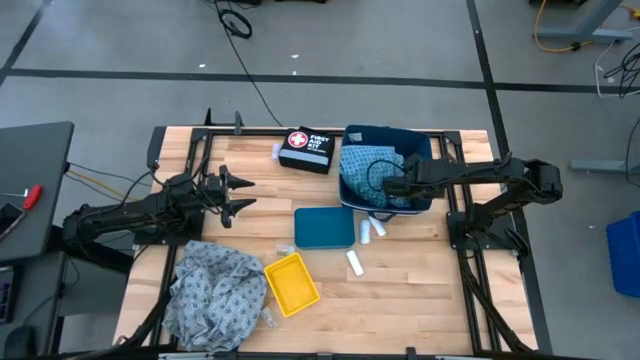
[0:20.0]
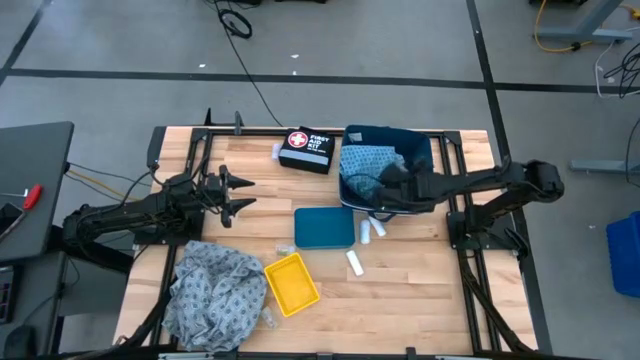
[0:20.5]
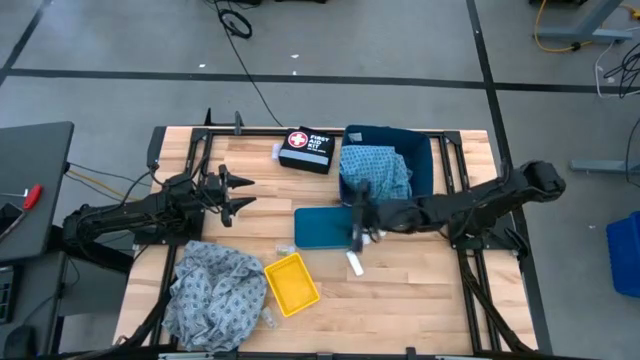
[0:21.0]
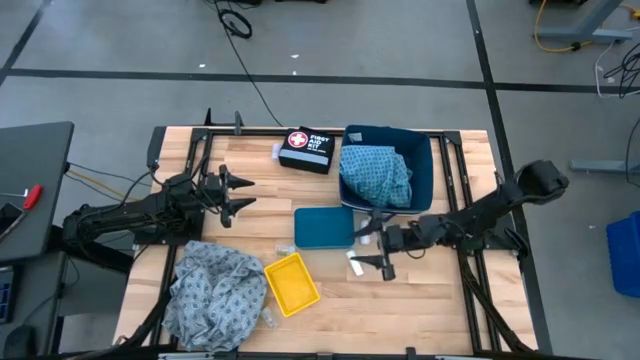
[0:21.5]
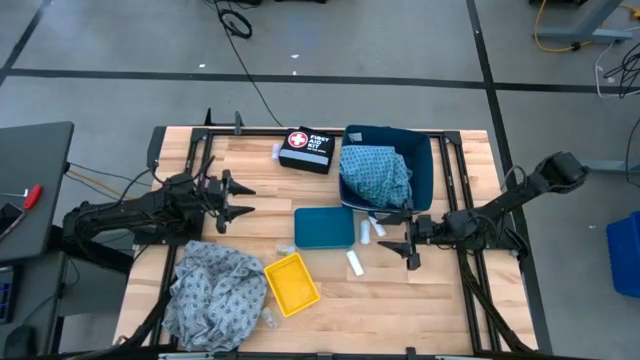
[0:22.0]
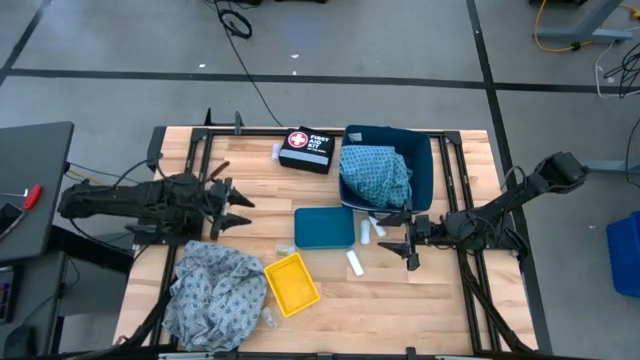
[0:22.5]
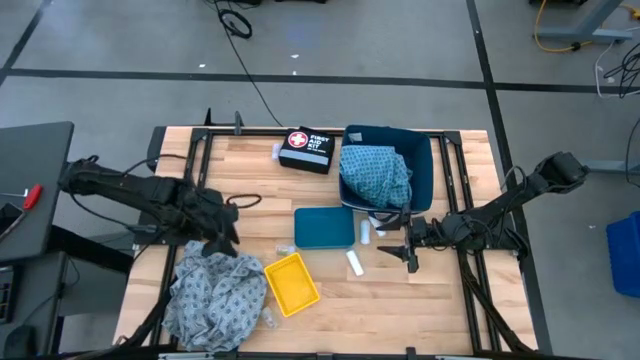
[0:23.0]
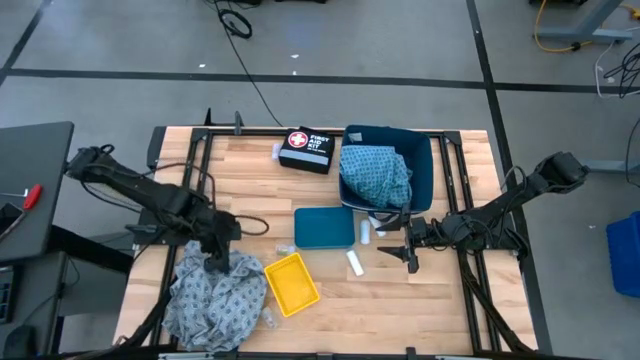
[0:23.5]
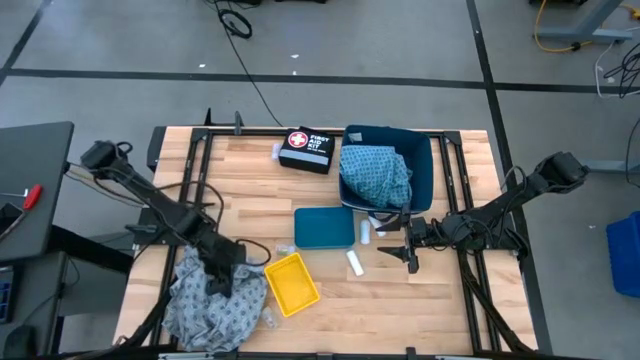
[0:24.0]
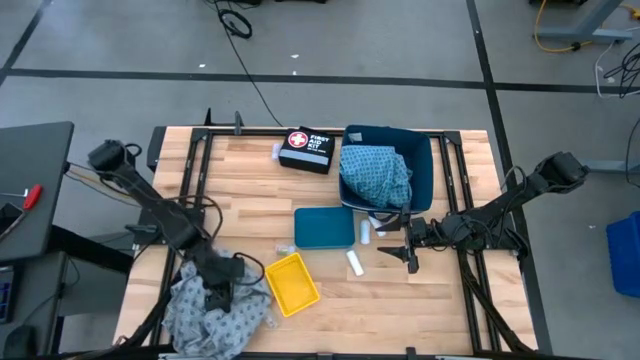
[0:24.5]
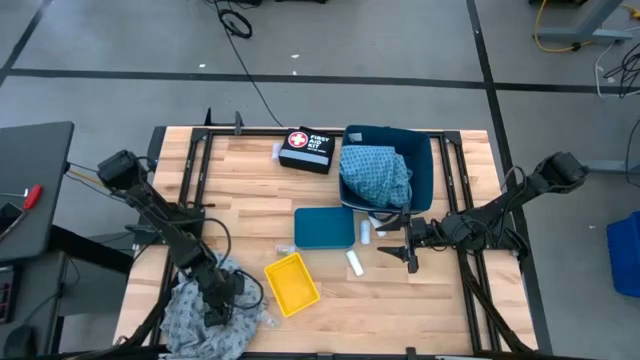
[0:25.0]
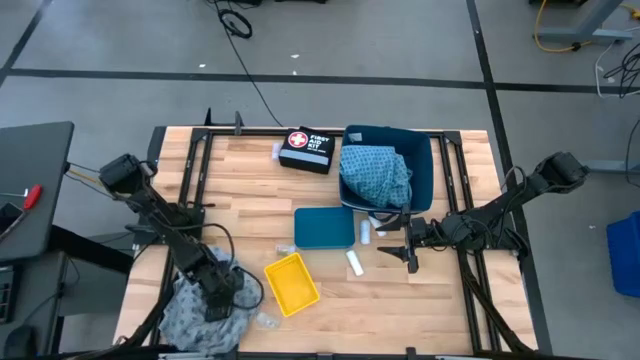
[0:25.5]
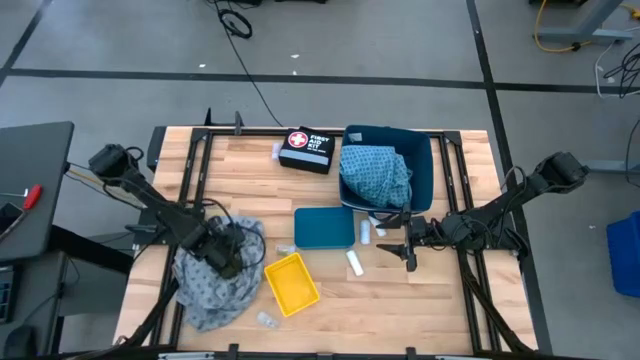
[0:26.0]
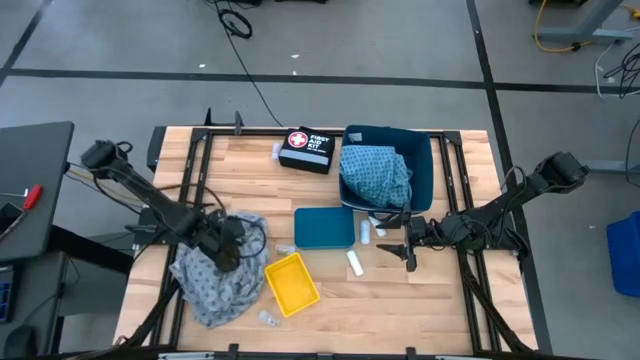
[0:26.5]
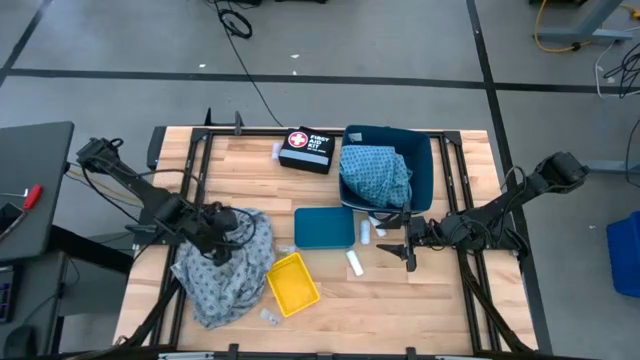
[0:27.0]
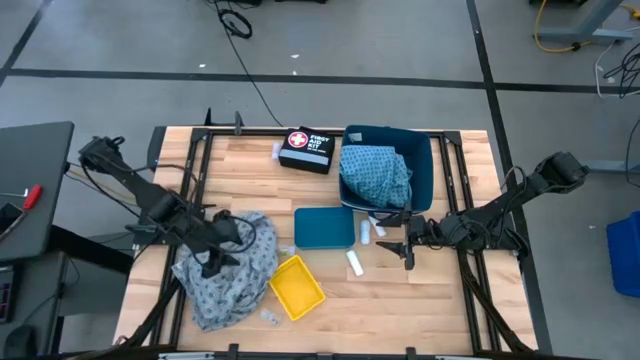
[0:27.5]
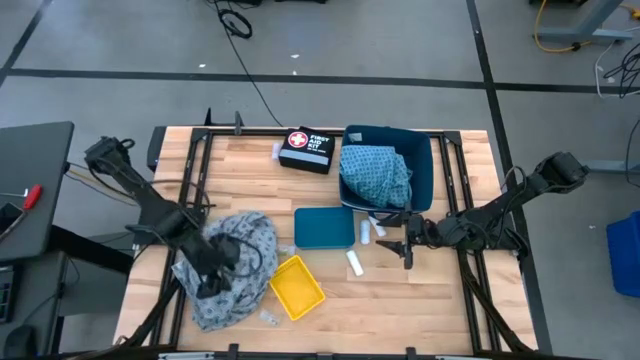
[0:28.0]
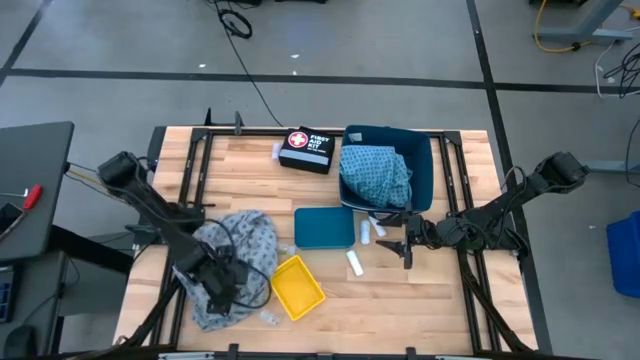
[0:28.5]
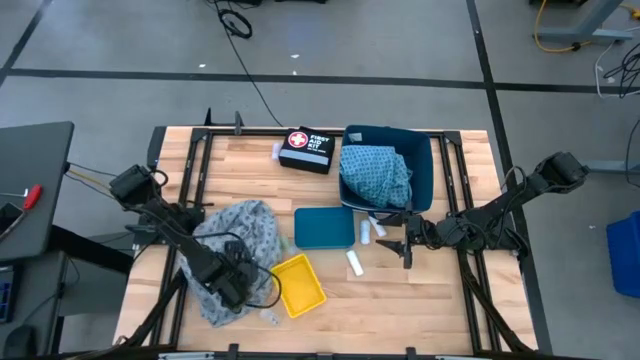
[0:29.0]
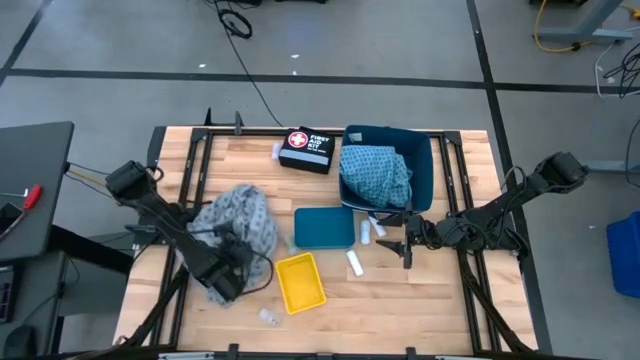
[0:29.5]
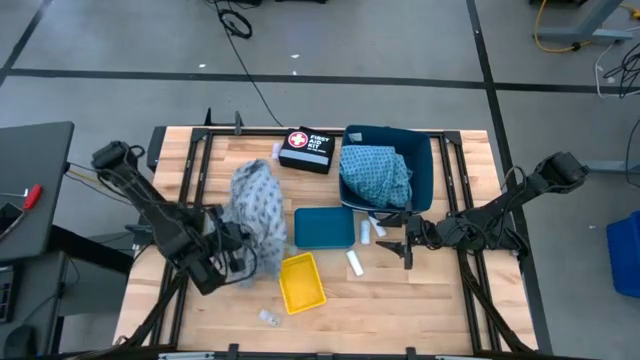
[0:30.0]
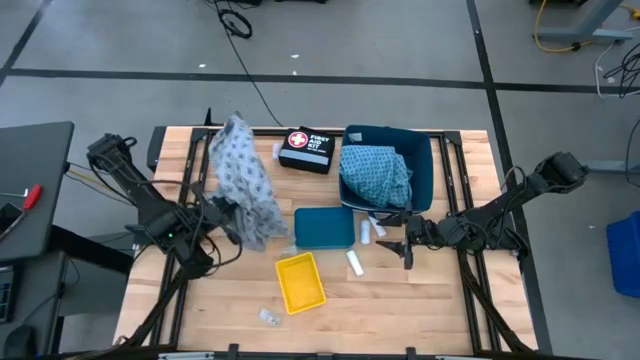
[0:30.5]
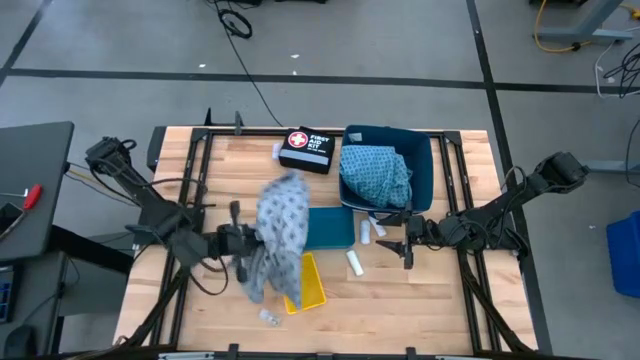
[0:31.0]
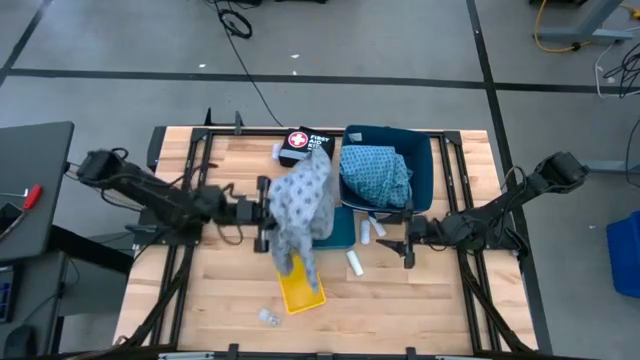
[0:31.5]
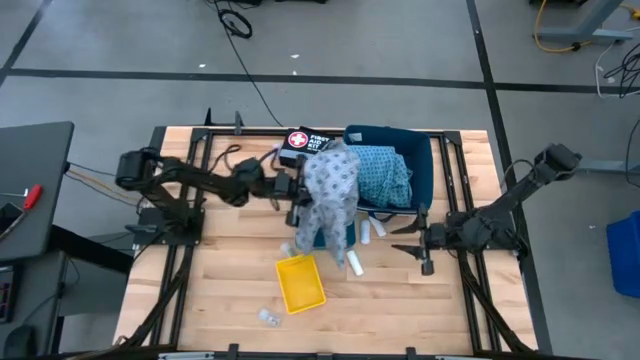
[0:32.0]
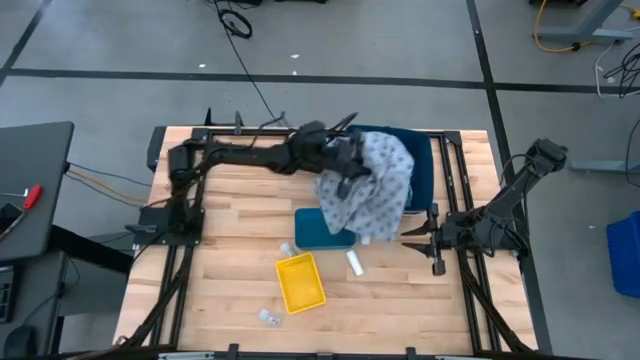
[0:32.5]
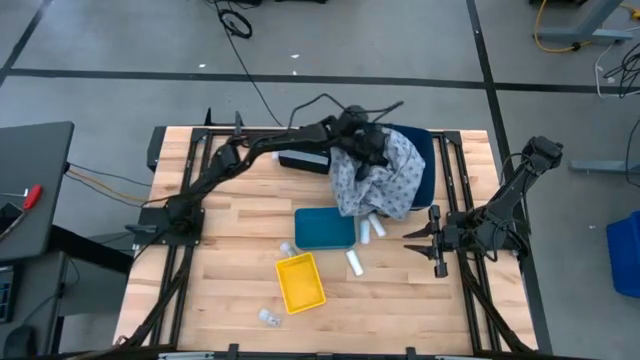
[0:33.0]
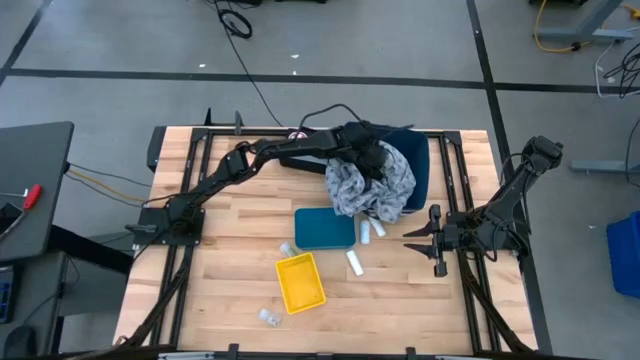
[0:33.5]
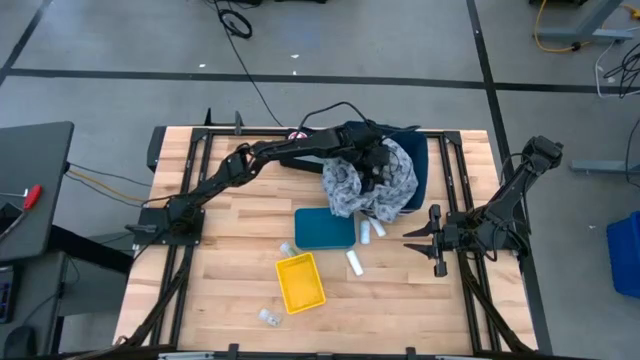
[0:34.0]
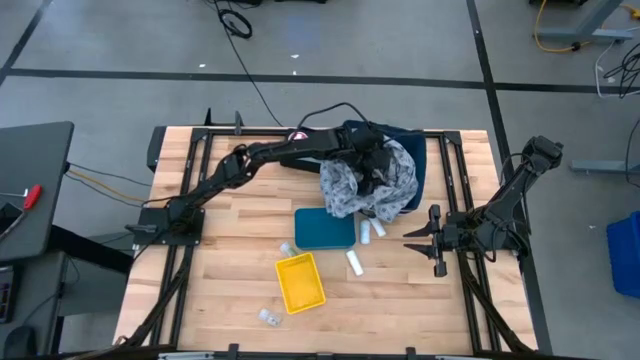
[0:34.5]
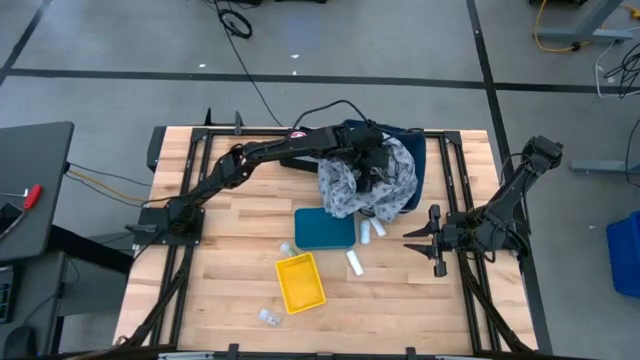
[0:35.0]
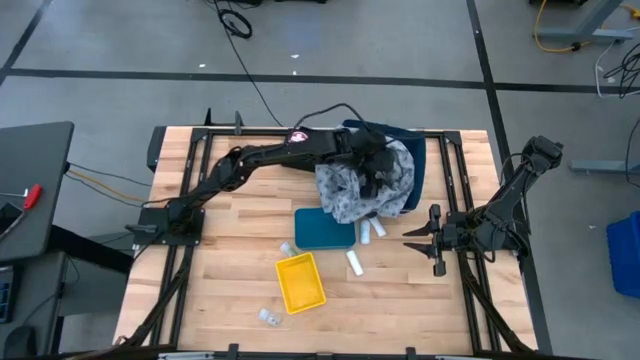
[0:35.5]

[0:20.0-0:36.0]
Task: Pick & place medical supplies in basket/bin
Put the gray patient gown into the white and blue bin

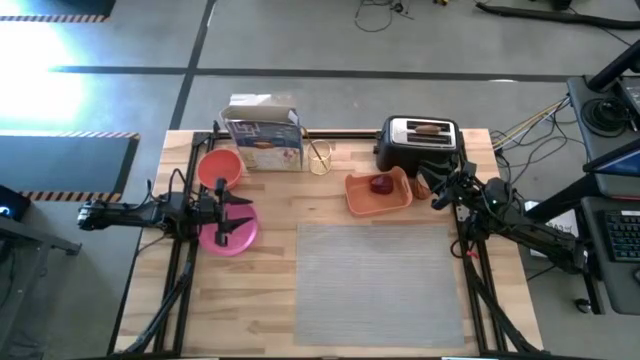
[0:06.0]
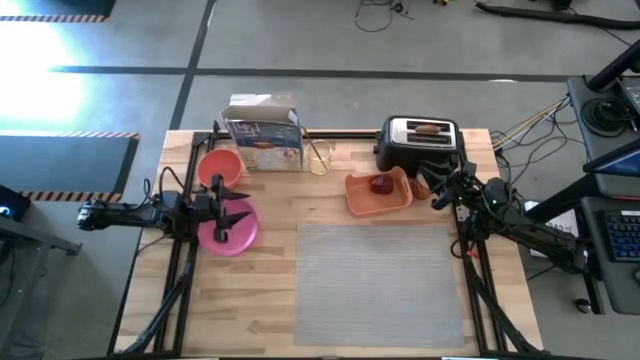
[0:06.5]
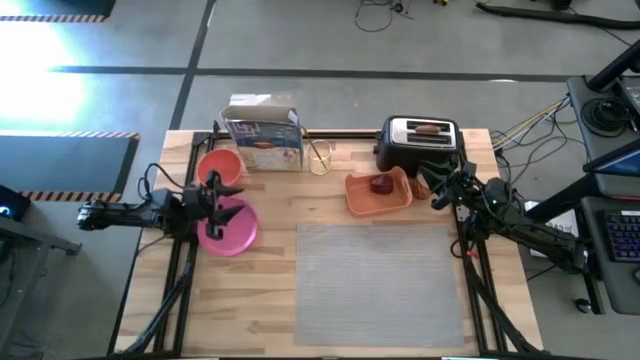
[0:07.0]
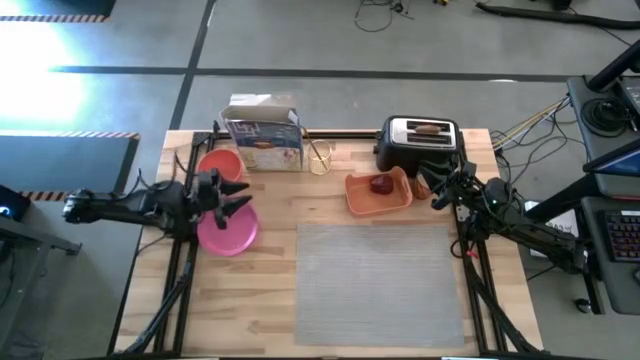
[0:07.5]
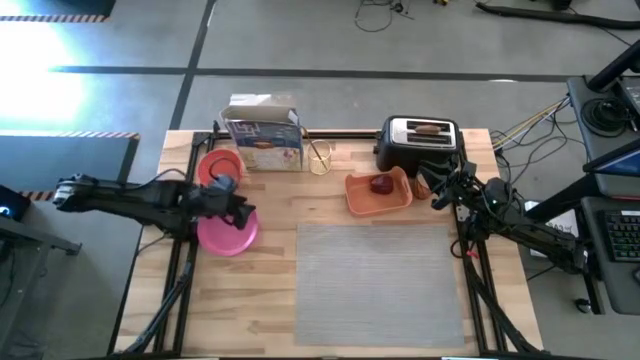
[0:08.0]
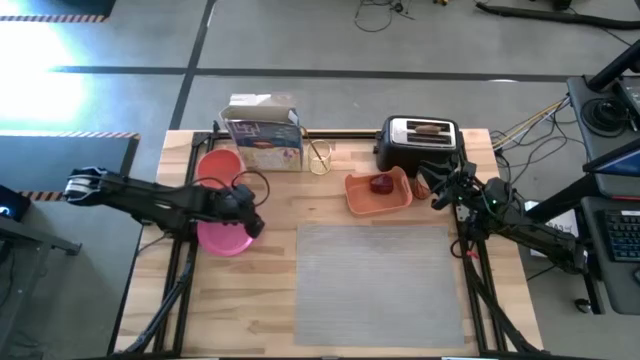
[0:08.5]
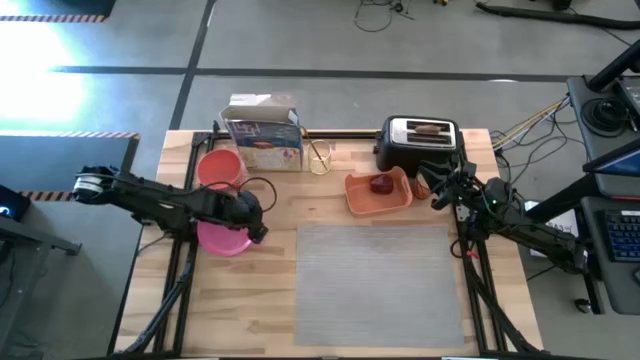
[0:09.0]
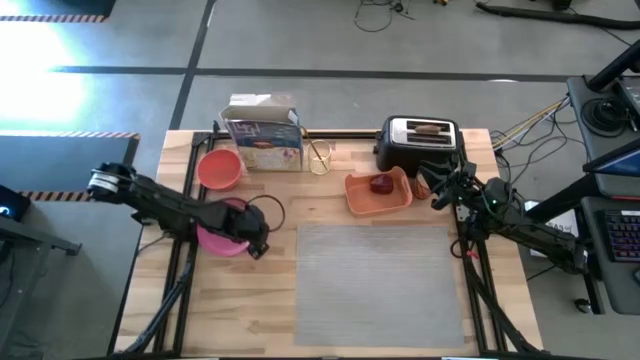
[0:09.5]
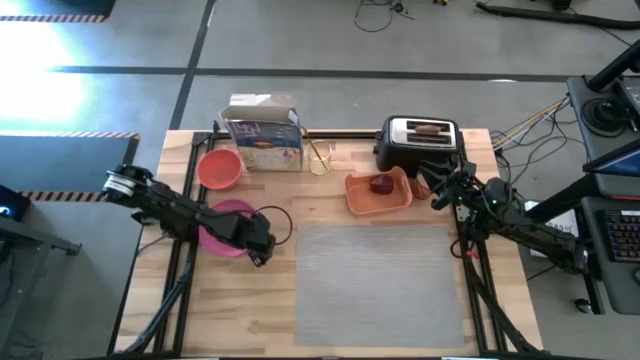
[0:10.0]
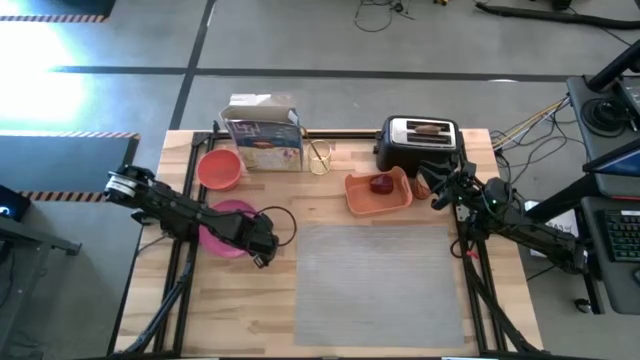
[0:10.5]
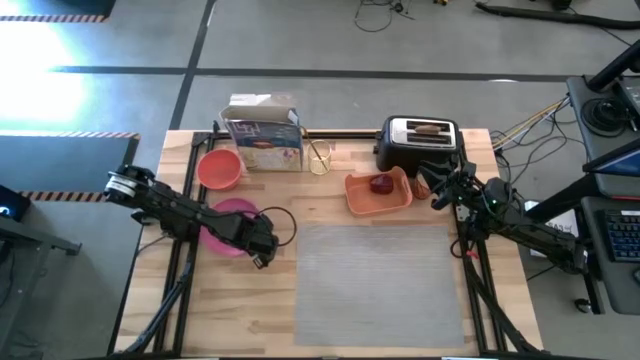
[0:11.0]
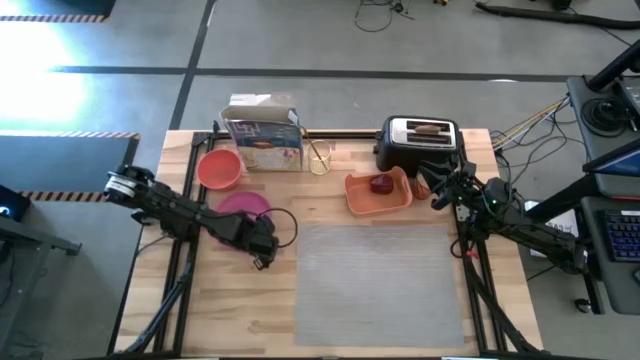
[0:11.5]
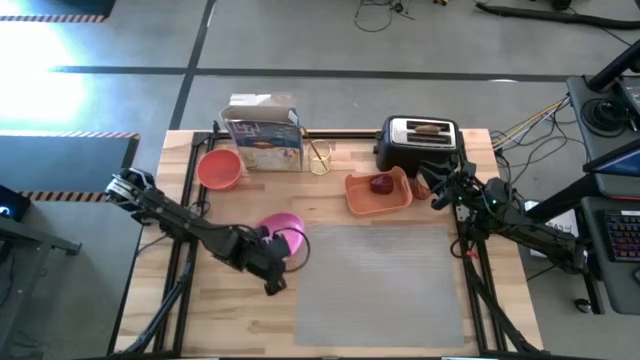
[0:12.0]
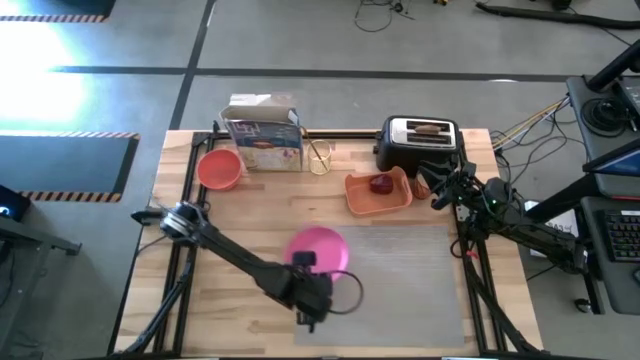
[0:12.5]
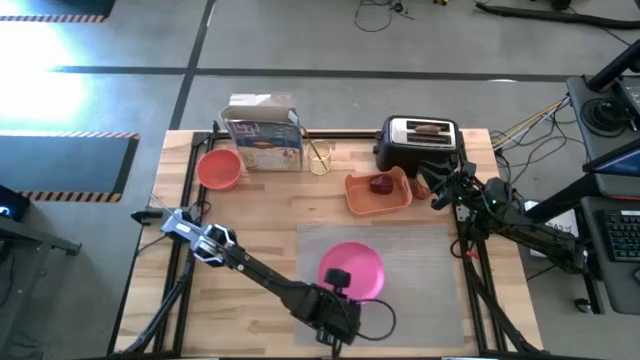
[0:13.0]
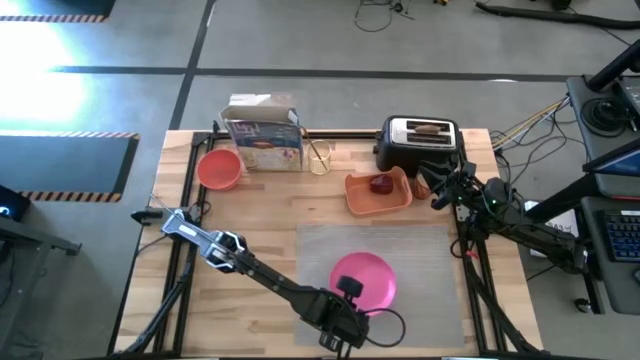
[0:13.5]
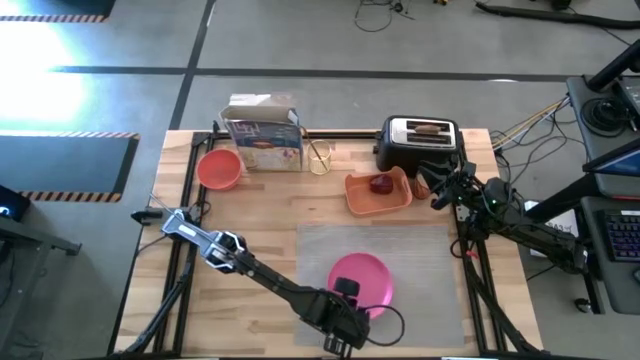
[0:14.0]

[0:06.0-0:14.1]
Task: Arrange a breakfast setting
Put the pink plate on the gray table mat
